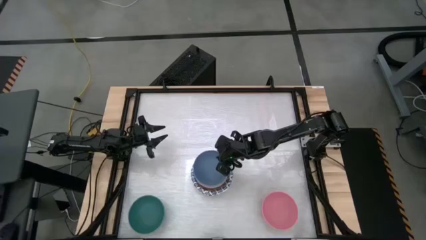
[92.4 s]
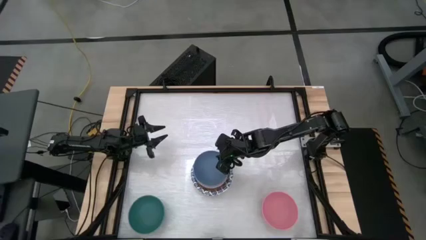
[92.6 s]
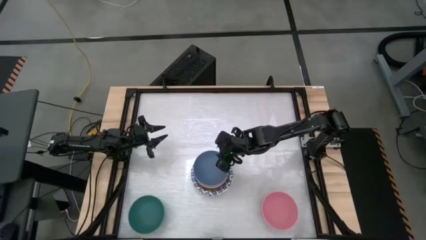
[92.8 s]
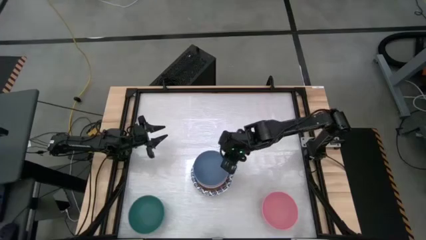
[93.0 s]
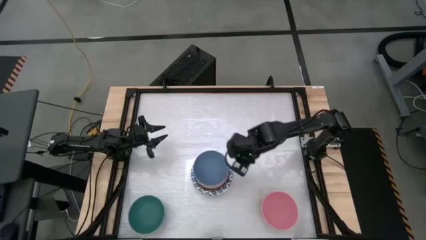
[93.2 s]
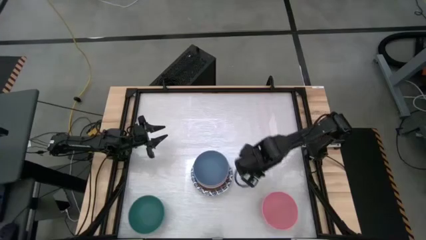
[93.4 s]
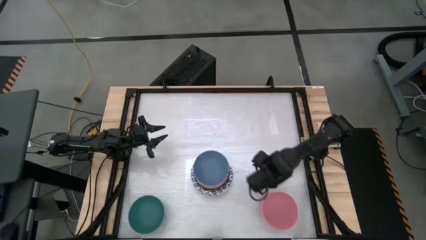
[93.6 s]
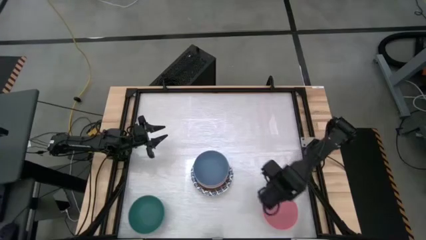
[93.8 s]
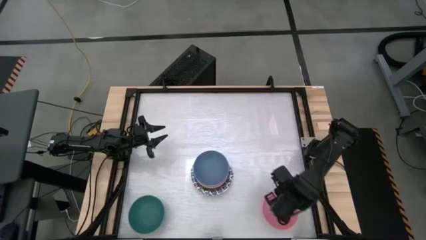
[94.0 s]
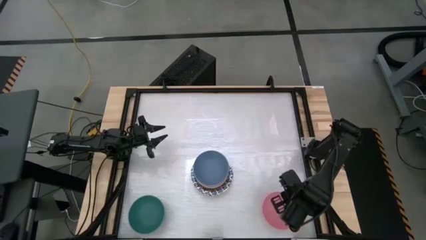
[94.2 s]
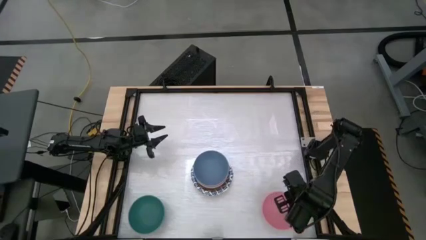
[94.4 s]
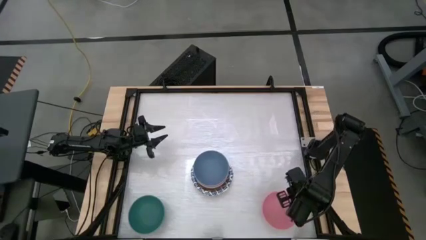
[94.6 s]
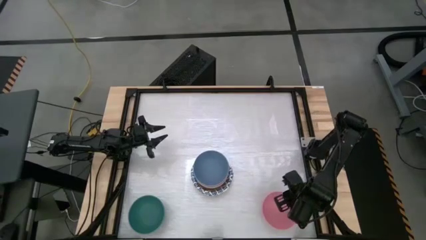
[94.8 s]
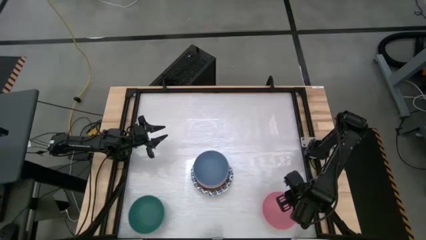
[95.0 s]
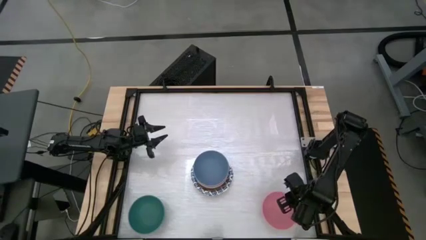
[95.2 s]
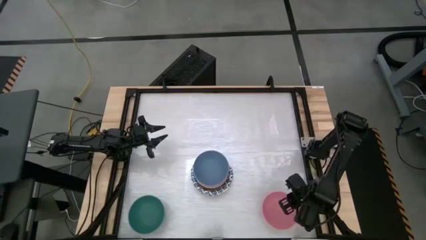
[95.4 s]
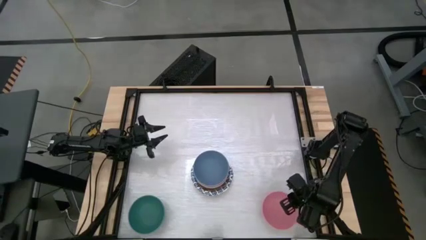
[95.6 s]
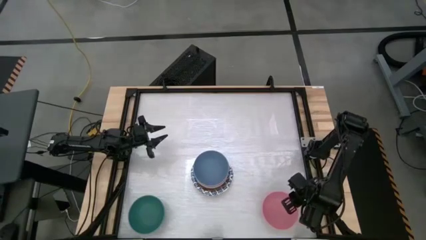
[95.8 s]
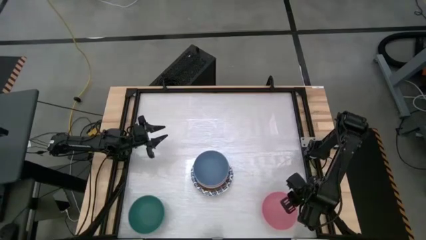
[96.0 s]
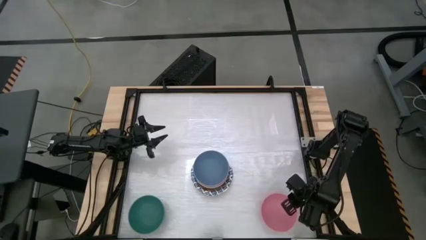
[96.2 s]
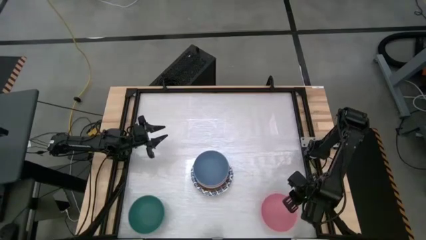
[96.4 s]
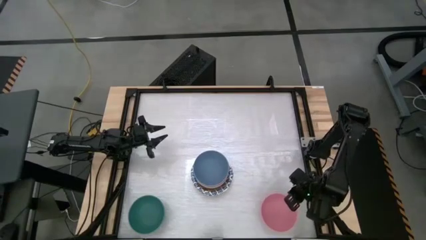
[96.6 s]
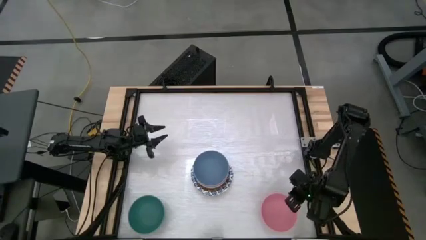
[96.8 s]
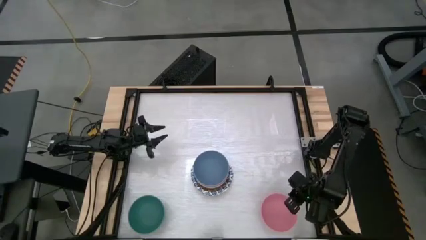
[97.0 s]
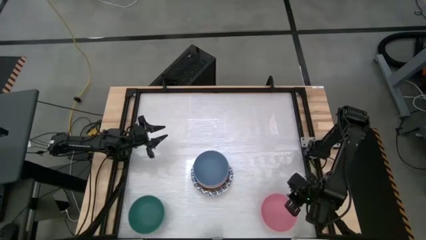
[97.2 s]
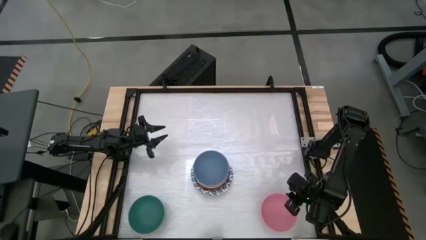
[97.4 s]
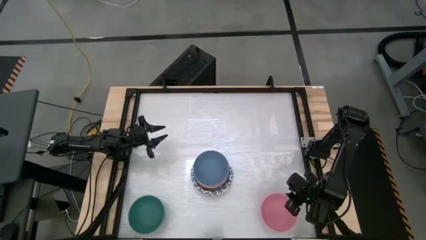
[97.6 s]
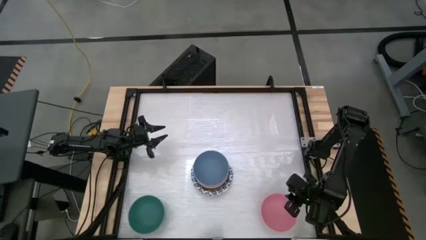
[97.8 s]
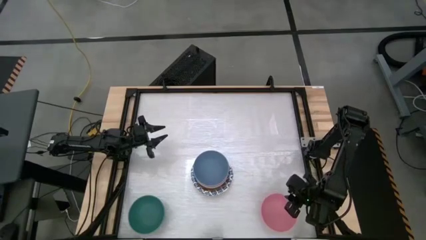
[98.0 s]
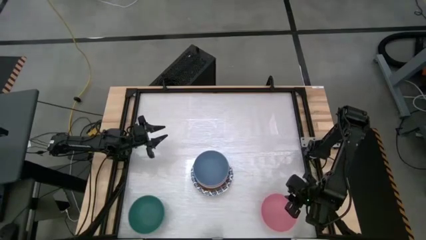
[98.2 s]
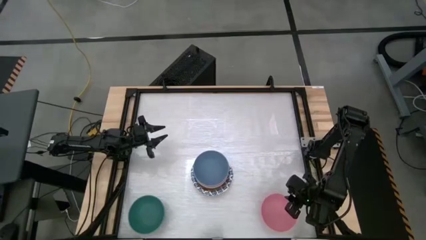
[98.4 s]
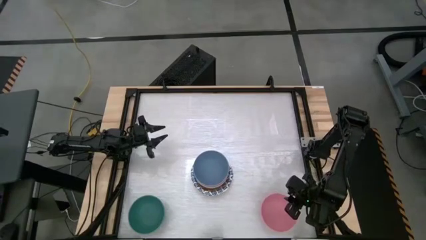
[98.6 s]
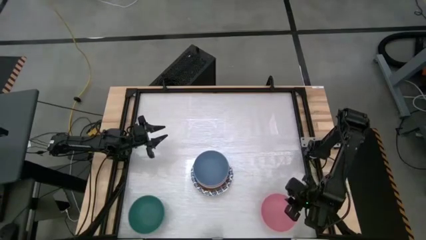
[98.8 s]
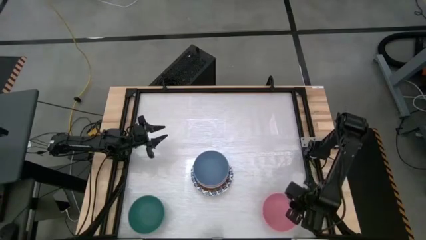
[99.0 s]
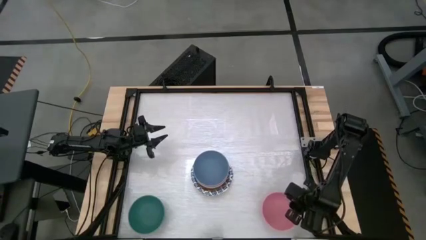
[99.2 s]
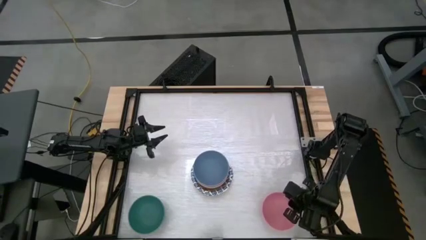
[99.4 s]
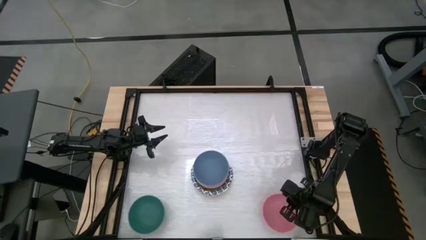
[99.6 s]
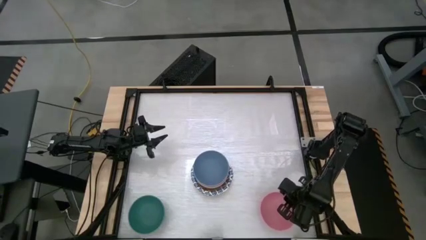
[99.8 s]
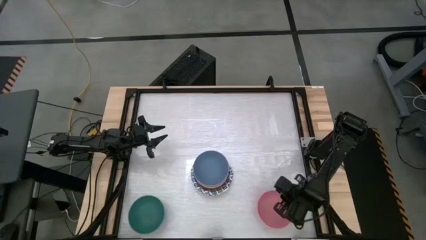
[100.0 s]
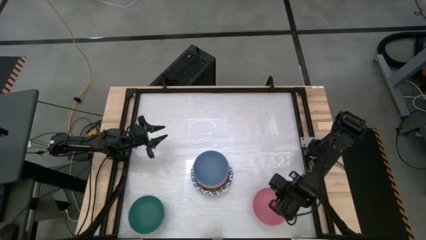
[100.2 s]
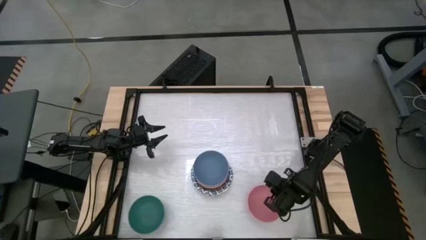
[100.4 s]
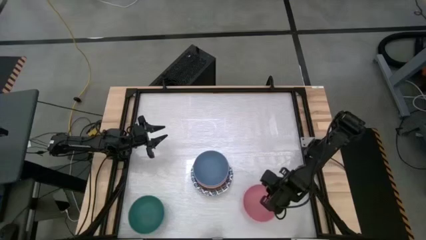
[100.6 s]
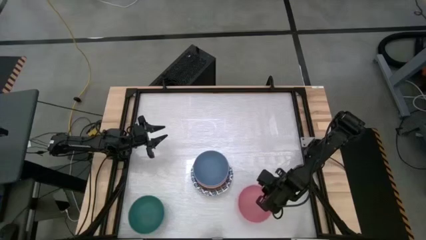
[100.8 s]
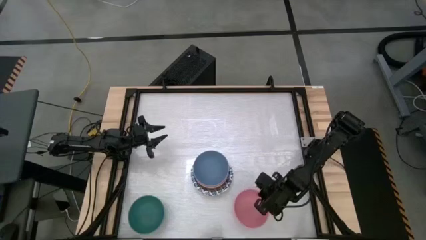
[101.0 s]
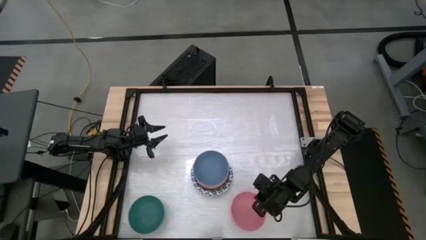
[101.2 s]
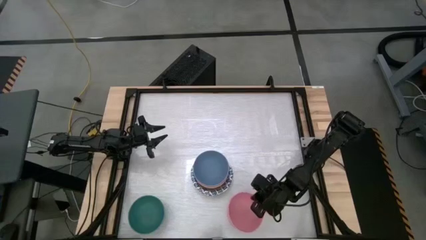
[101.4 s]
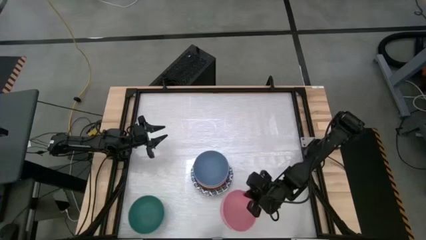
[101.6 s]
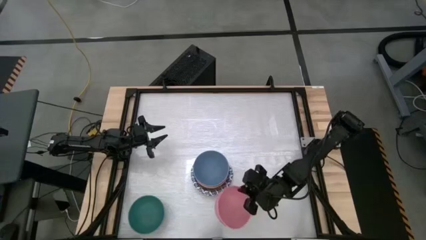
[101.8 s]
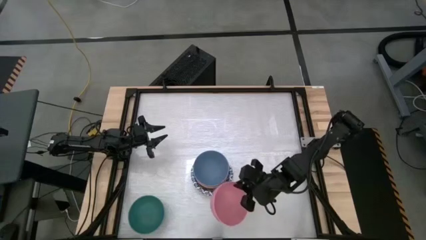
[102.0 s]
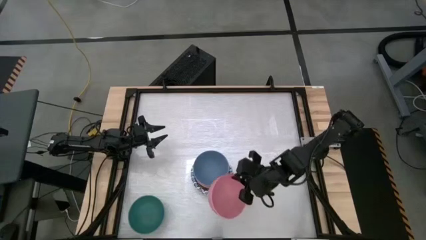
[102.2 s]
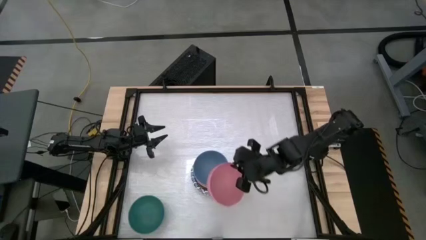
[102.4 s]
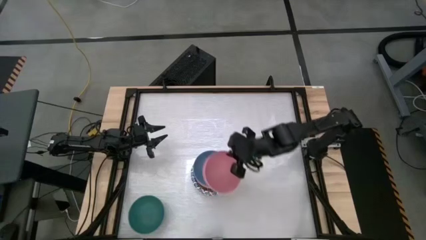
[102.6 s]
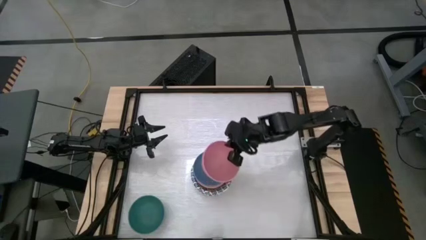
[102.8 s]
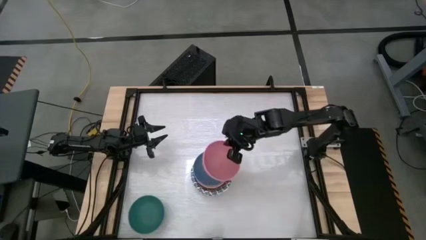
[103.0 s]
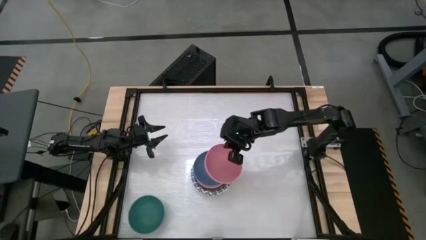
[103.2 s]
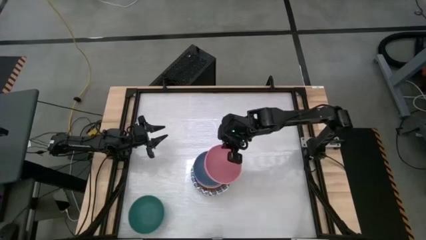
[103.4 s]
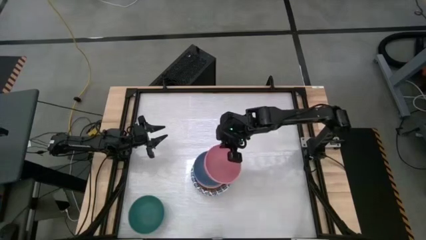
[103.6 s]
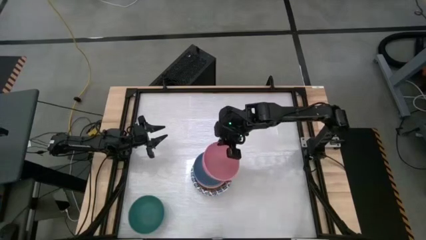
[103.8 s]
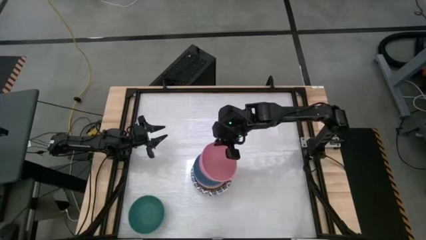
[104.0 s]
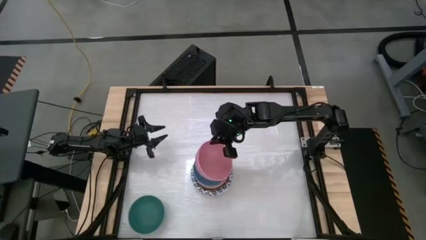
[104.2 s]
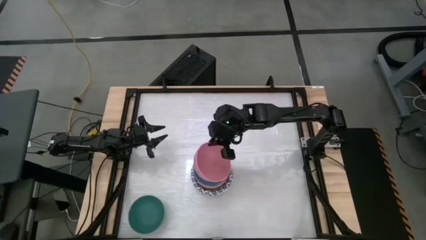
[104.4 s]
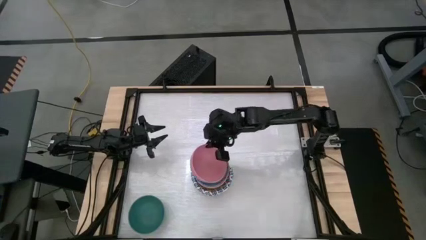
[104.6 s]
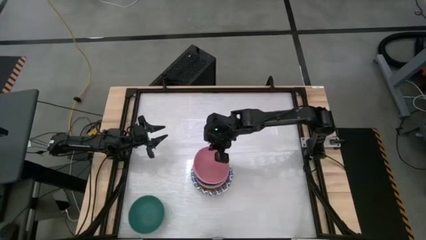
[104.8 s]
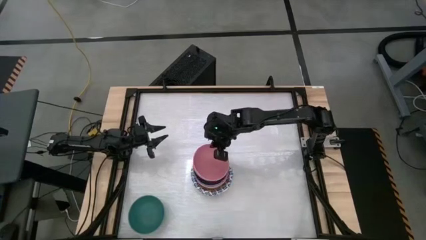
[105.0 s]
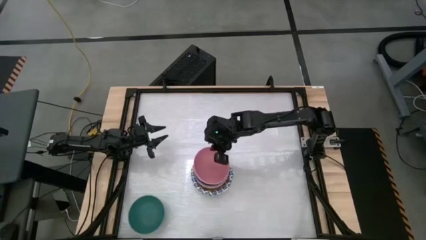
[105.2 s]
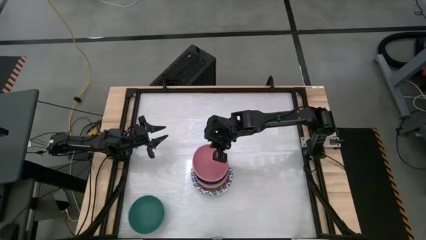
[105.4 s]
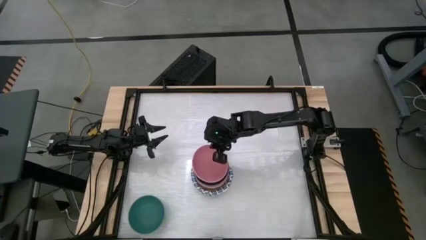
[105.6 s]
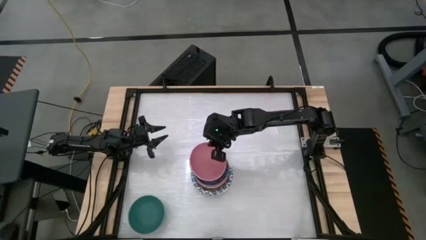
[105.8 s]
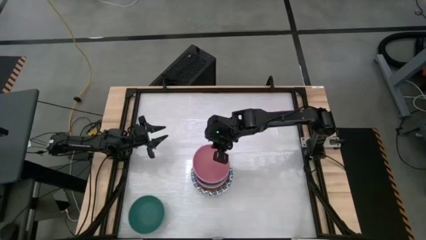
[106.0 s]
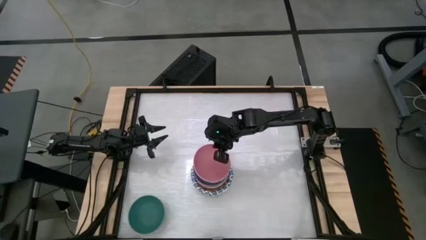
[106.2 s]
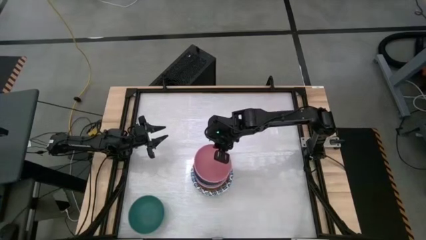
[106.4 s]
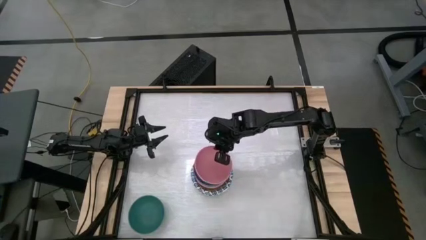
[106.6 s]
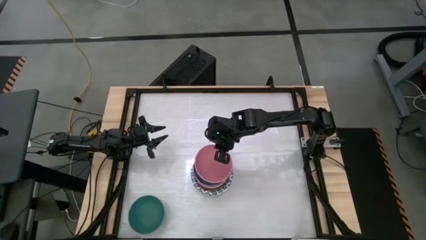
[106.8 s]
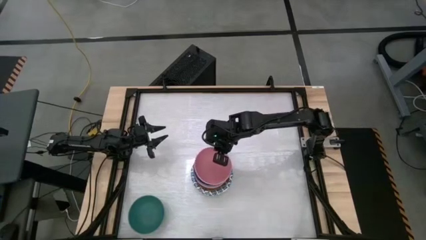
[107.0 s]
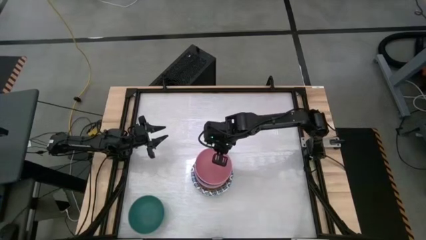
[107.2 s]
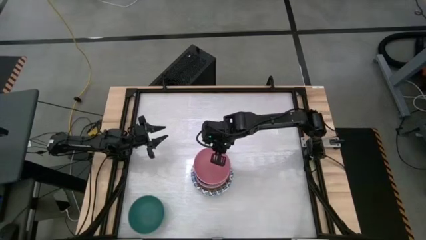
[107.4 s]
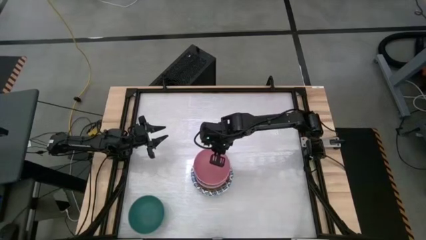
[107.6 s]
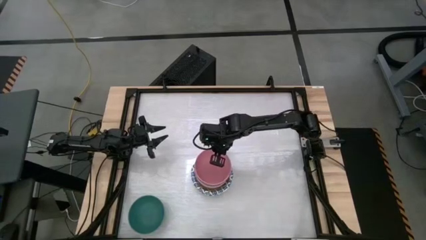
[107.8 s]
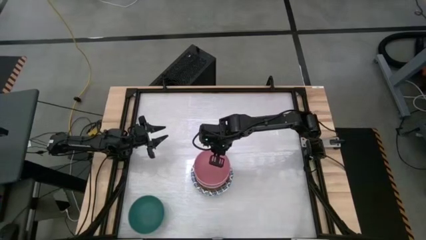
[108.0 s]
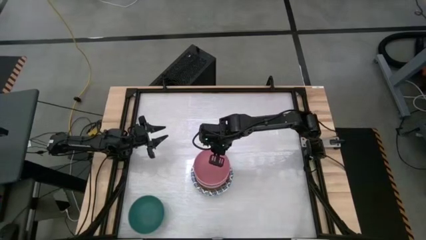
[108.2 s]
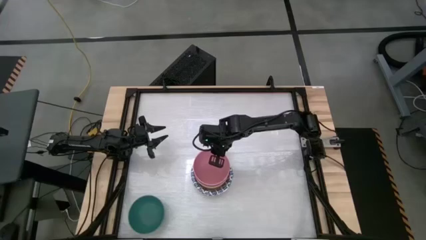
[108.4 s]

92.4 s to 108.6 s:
Task: Nest bowls inside each other by size order
Stack the pink bowl into the blue bowl
